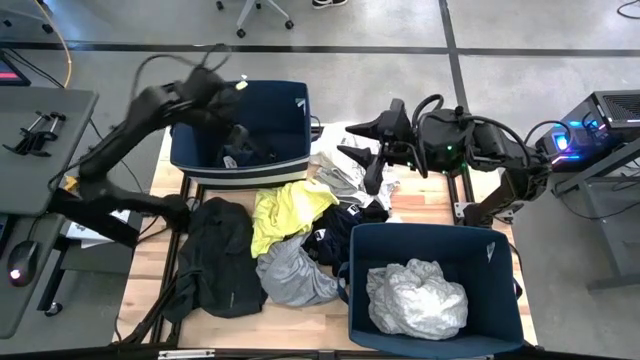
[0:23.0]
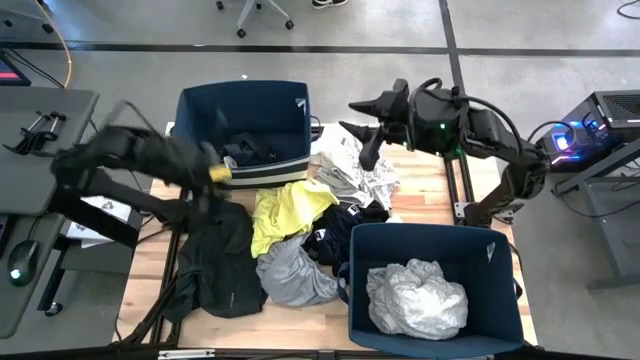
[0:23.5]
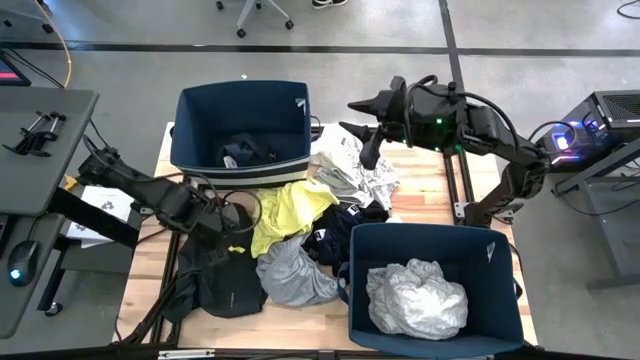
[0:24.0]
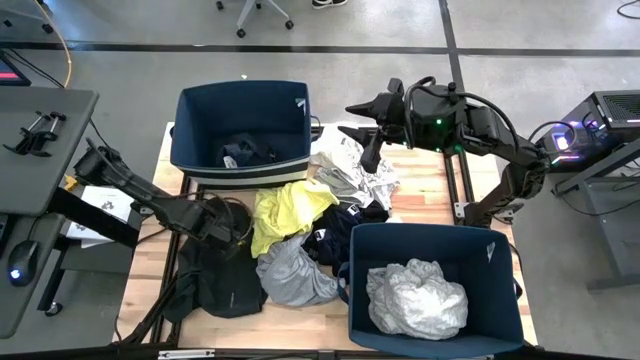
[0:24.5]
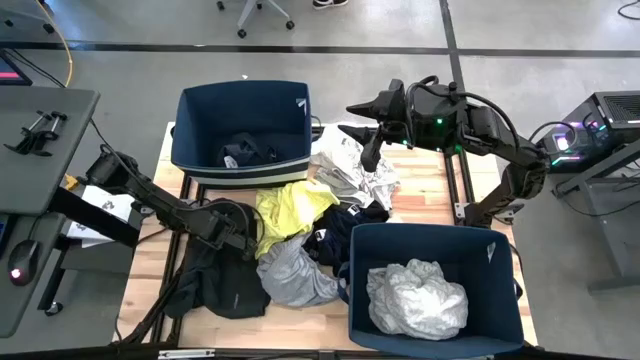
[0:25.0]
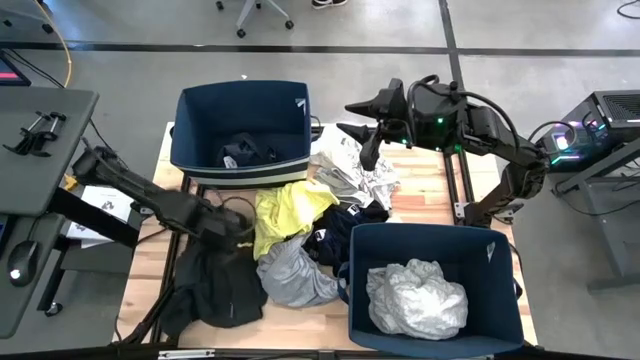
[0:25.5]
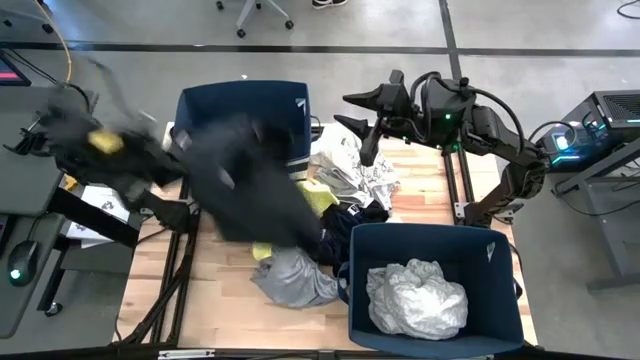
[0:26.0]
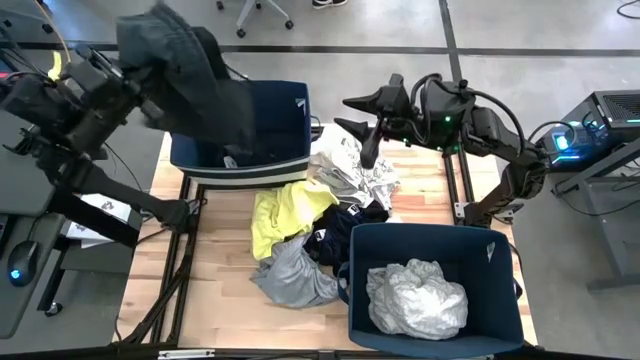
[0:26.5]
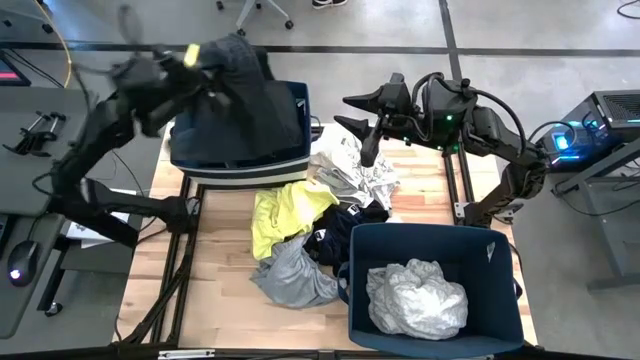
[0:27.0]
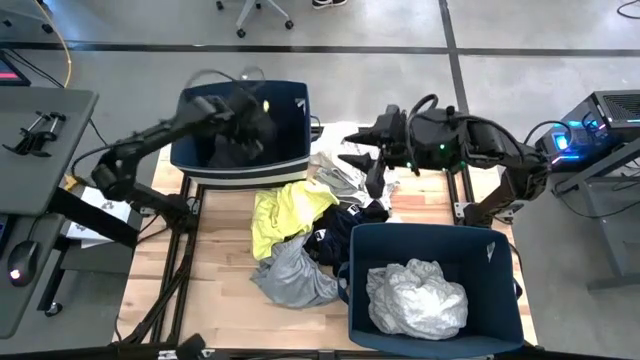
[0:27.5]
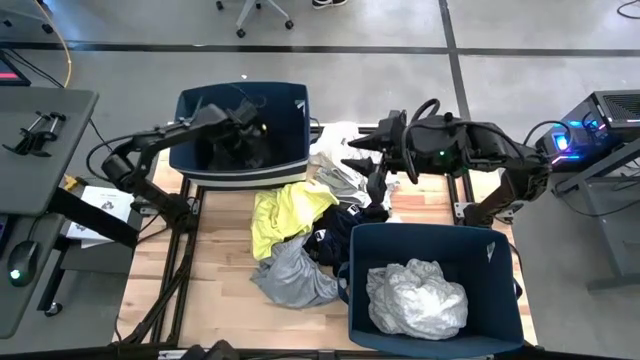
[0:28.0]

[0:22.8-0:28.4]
Task: Sort clothes
Put the black shorts into the top blue laundry bin

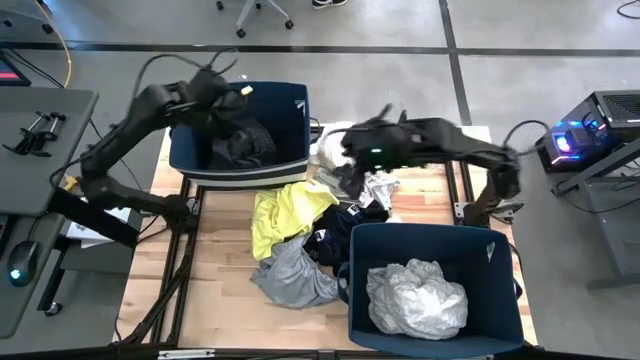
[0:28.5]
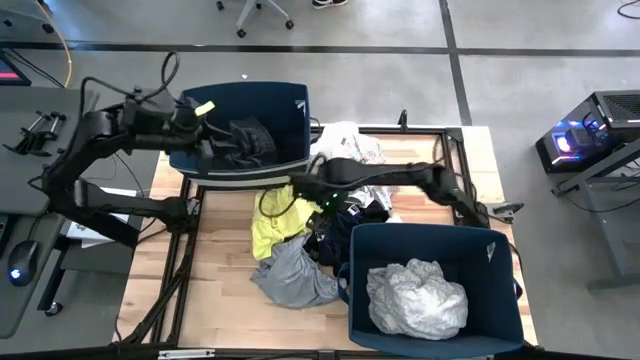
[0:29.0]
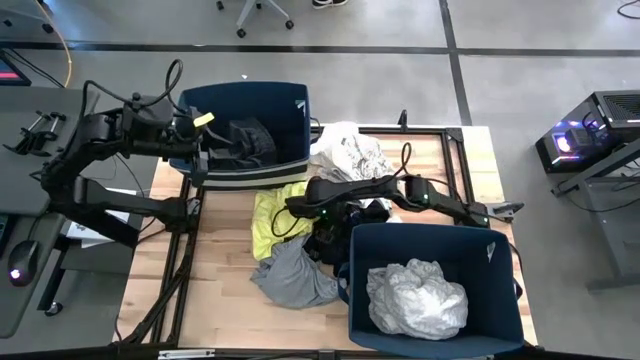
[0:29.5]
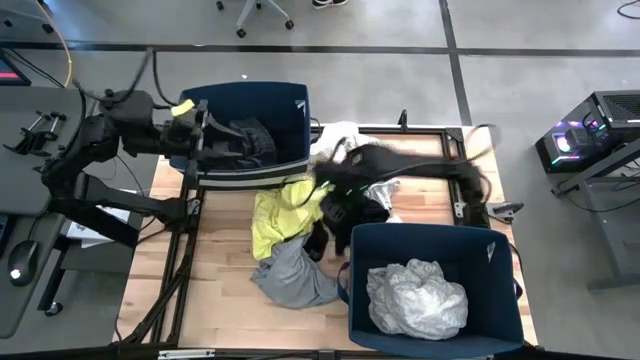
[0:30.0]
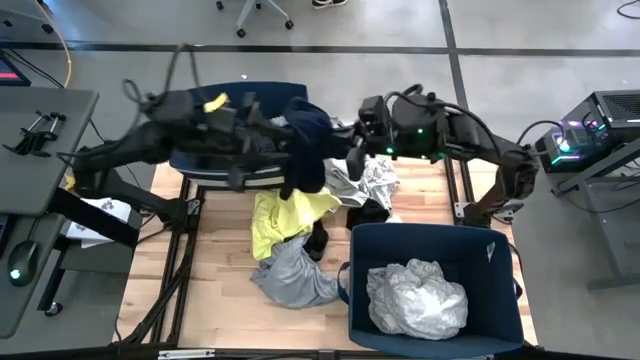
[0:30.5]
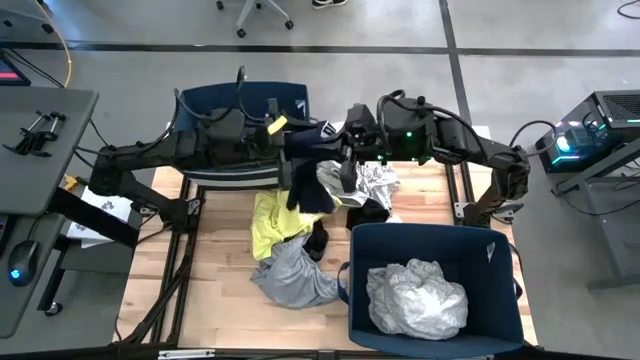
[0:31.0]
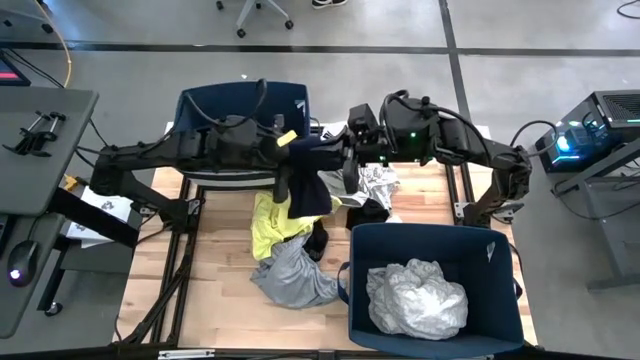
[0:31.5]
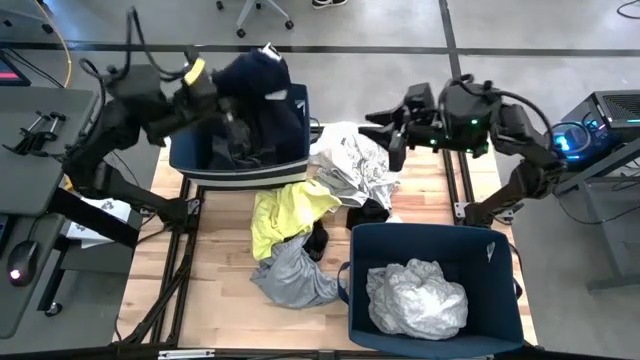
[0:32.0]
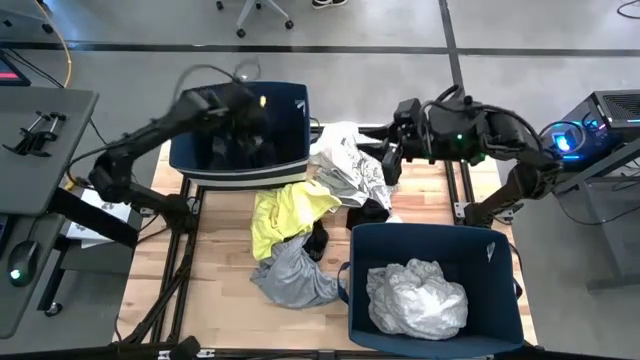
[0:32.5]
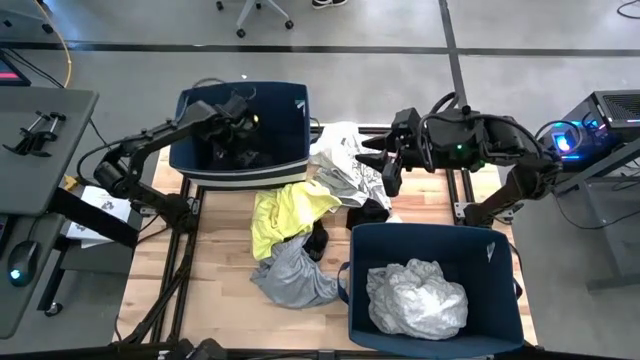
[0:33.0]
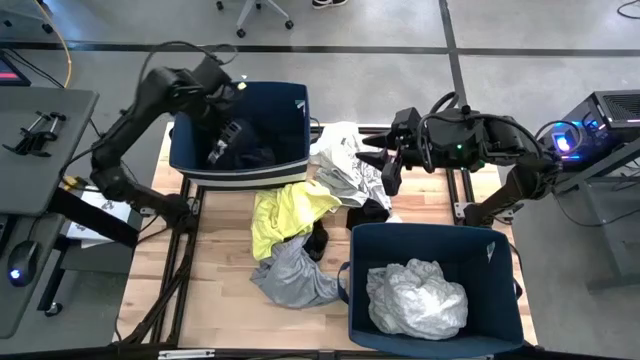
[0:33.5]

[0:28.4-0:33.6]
Put the blue boxer shorts into the top blue laundry bin

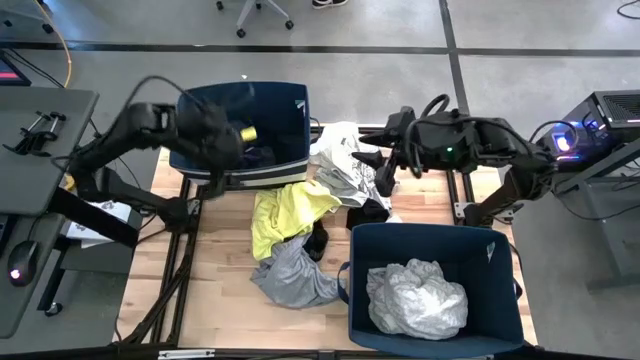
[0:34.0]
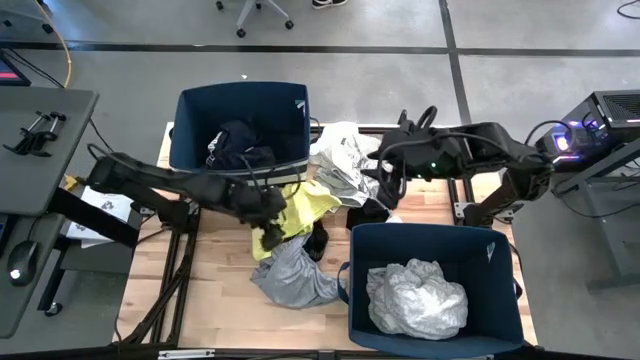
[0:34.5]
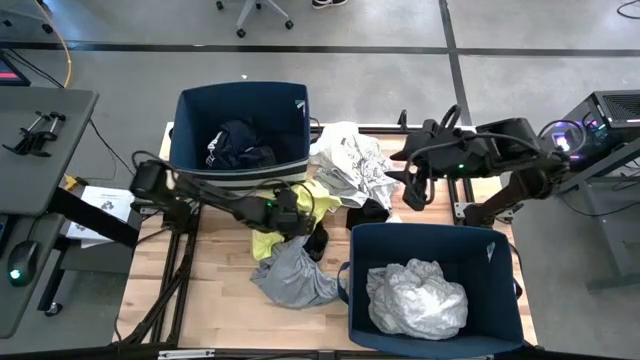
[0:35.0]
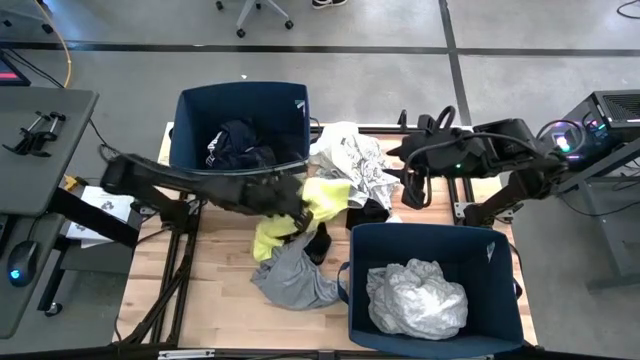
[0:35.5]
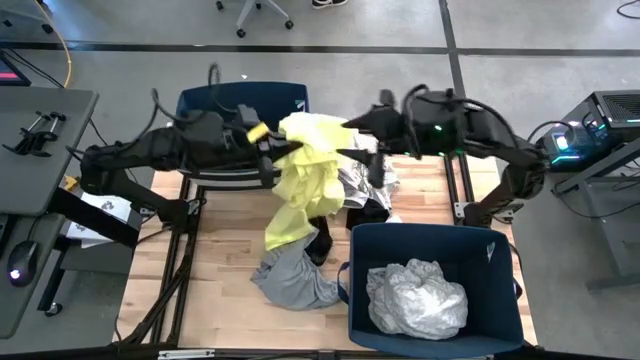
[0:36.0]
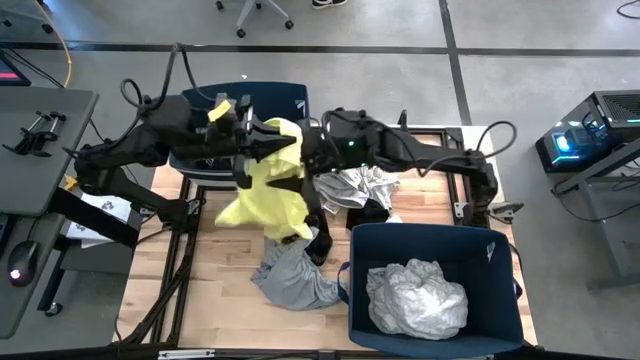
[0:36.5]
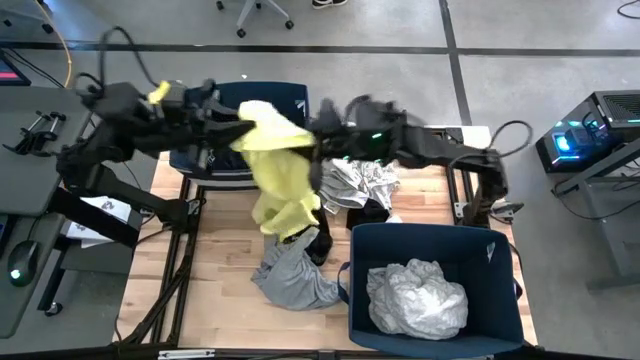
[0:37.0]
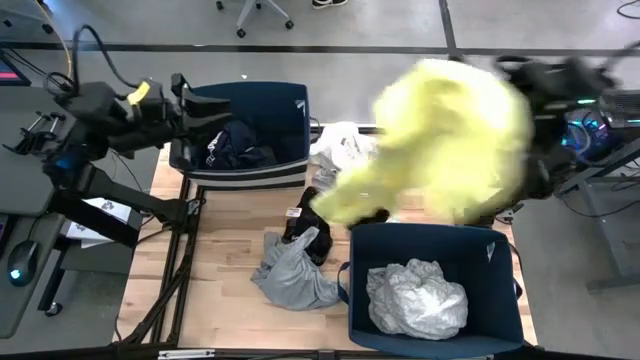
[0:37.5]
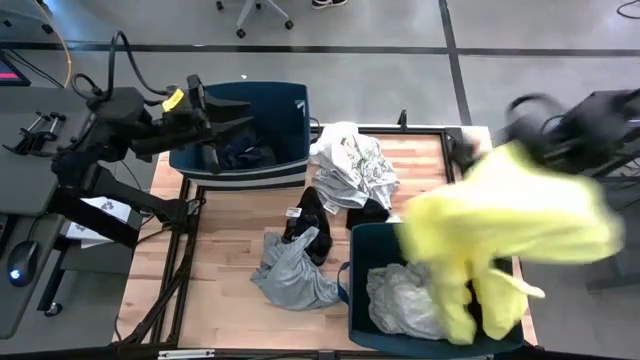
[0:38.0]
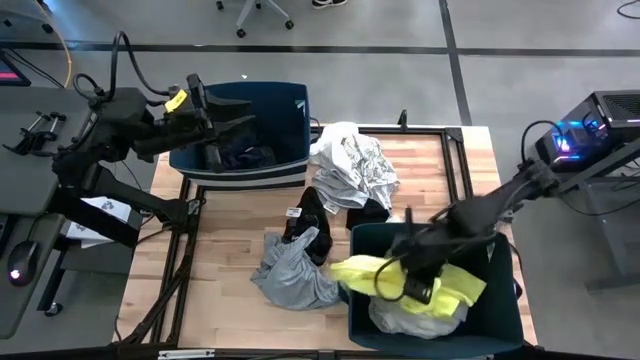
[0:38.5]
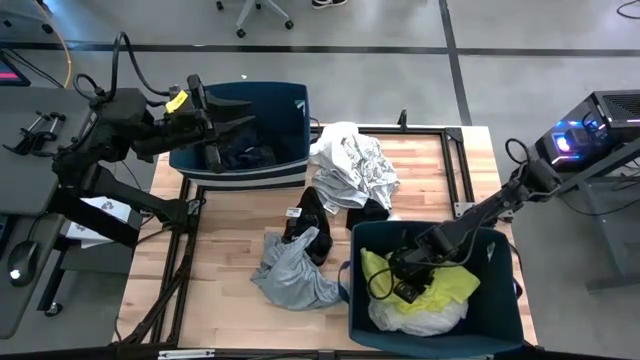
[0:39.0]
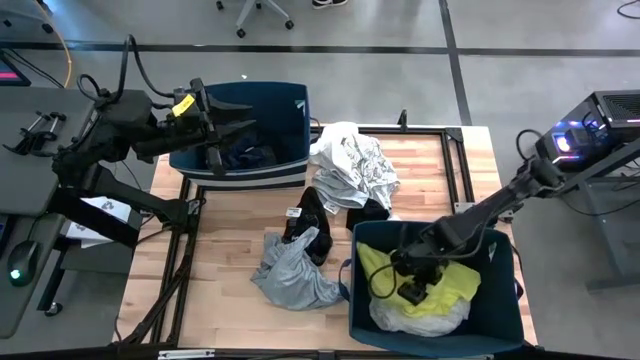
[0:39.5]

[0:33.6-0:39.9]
Put the yellow shirt into the bottom blue laundry bin

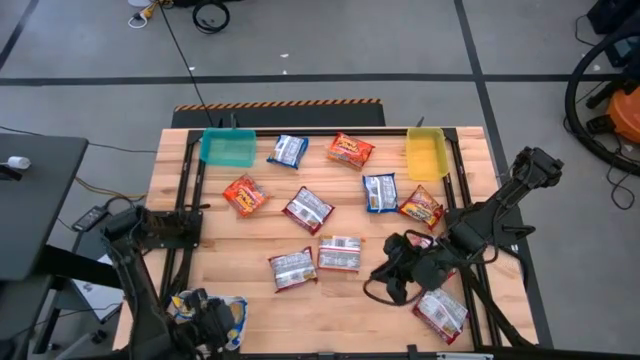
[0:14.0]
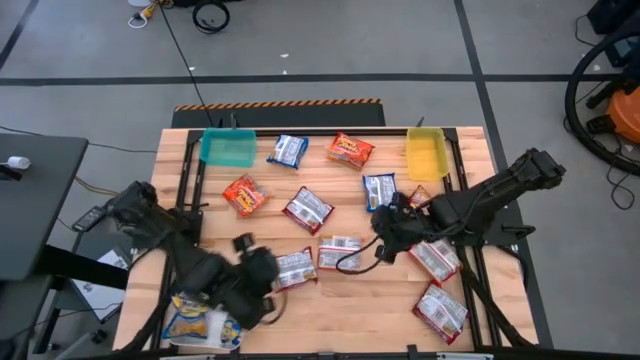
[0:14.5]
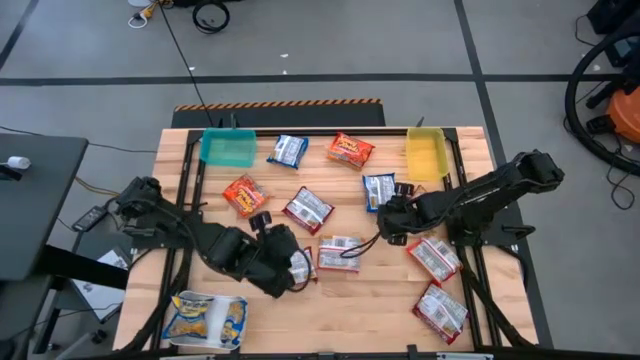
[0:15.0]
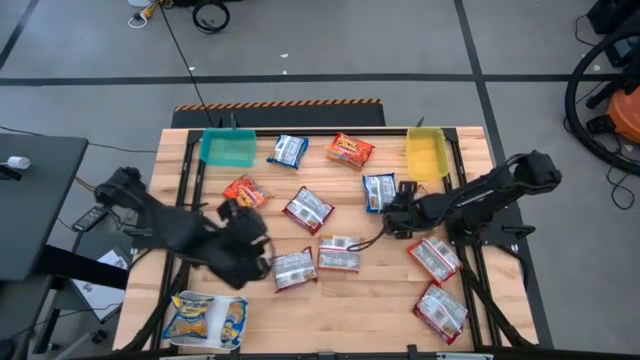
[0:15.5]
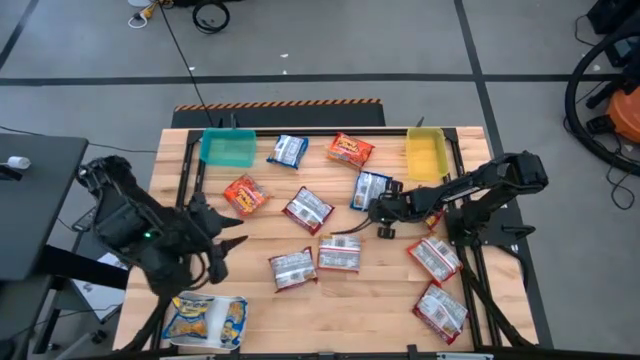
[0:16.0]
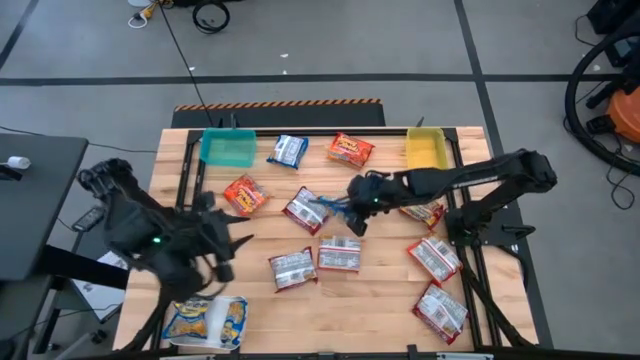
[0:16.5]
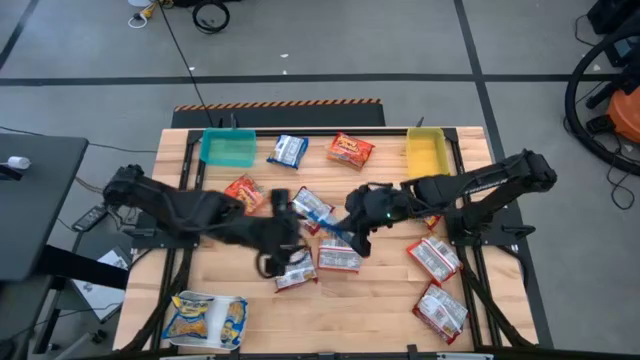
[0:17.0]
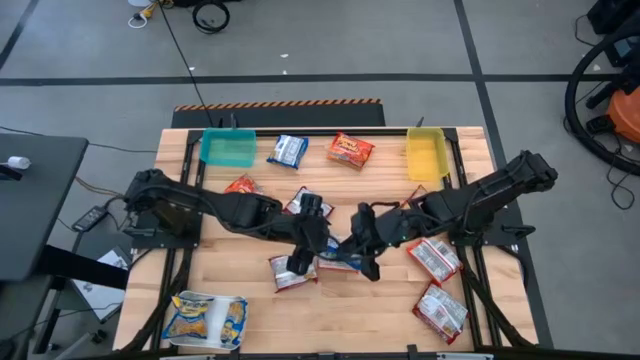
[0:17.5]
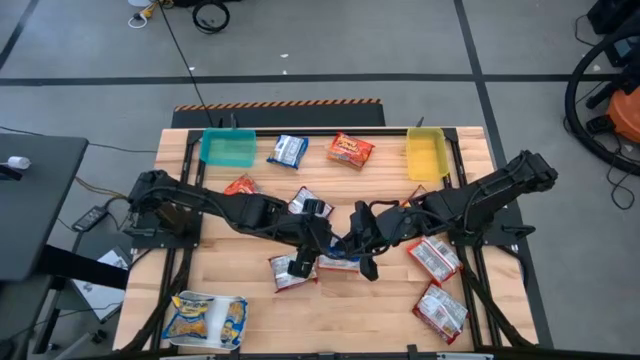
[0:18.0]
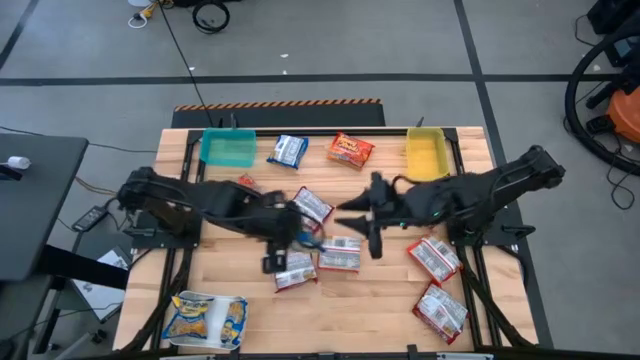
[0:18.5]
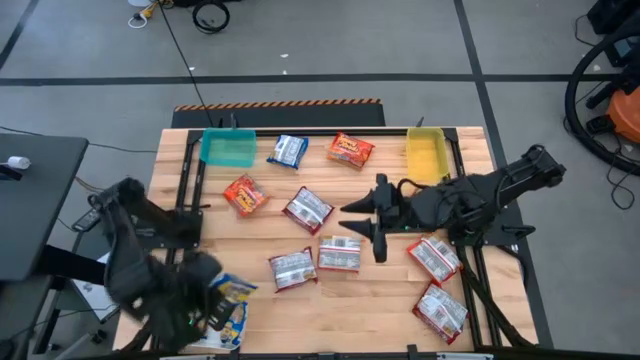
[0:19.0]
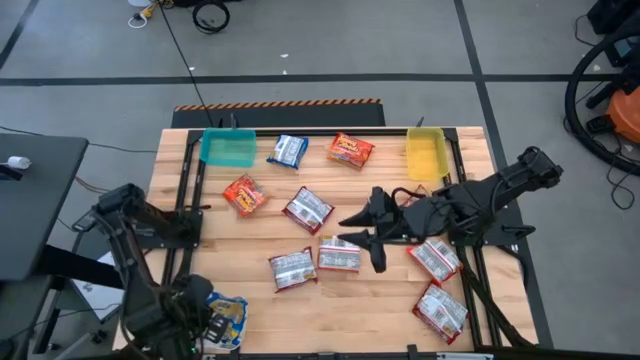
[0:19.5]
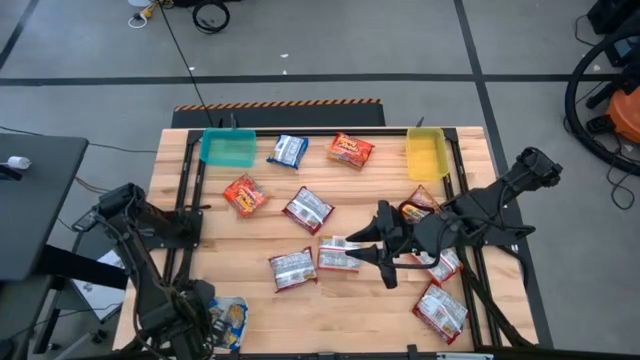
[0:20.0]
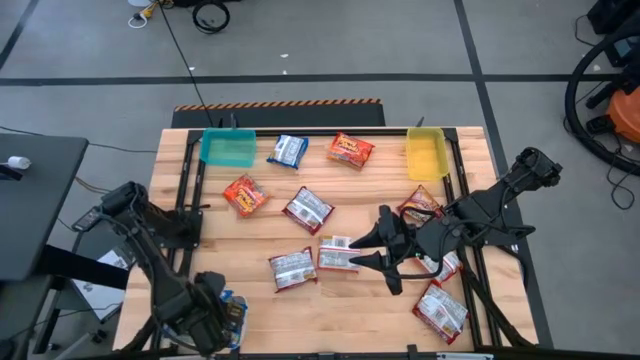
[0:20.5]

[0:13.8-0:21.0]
Task: Sort Maruchan noodles
Put the blue noodle pack into the white bin
